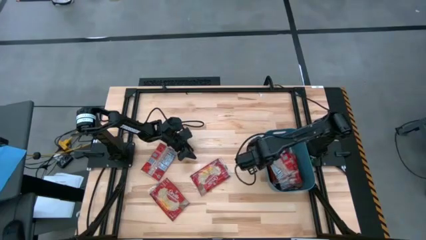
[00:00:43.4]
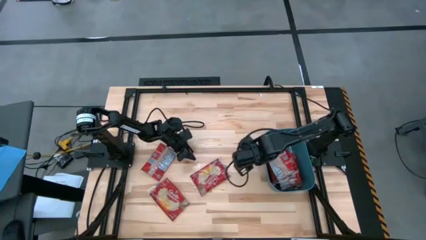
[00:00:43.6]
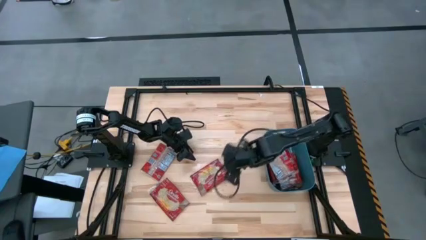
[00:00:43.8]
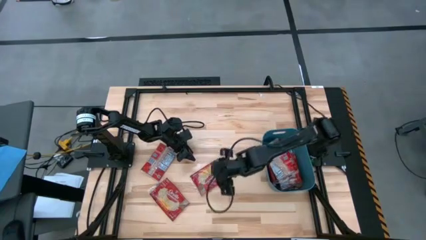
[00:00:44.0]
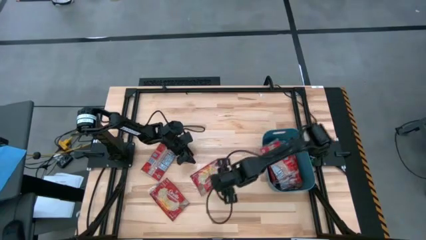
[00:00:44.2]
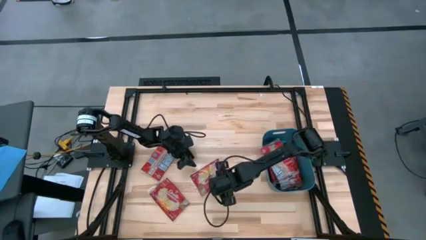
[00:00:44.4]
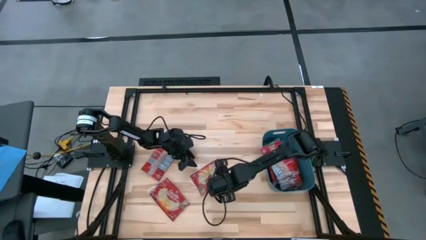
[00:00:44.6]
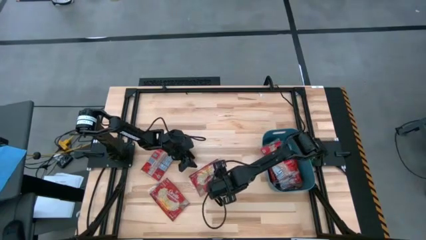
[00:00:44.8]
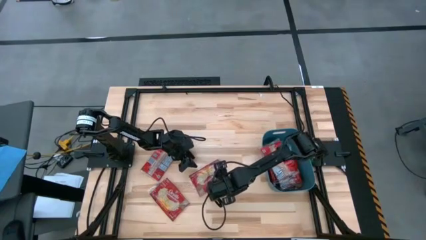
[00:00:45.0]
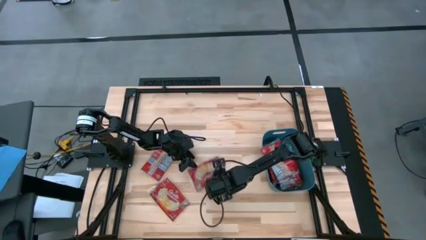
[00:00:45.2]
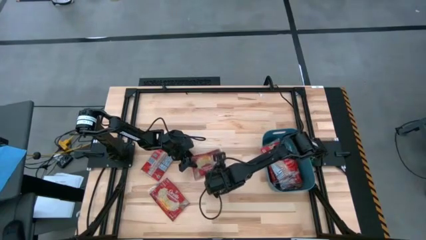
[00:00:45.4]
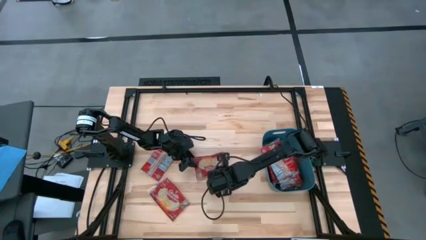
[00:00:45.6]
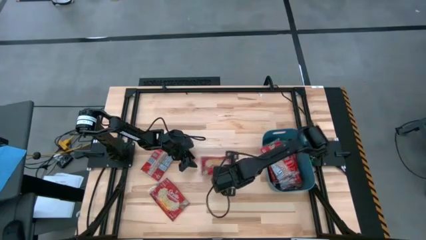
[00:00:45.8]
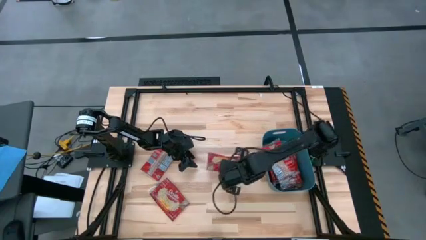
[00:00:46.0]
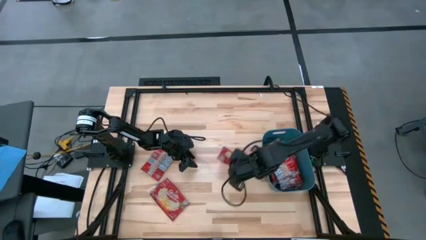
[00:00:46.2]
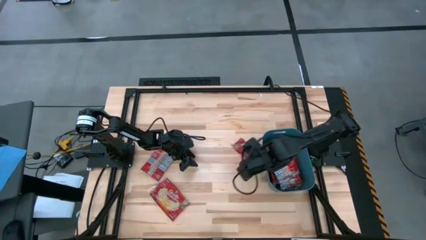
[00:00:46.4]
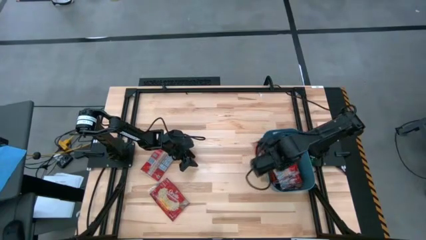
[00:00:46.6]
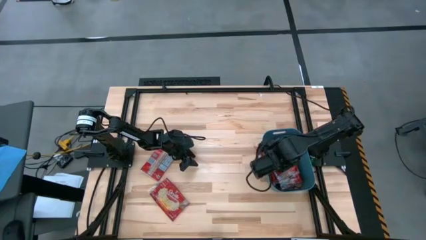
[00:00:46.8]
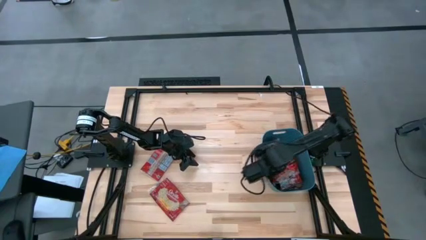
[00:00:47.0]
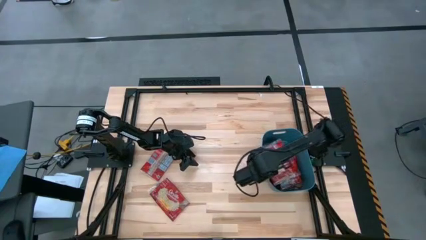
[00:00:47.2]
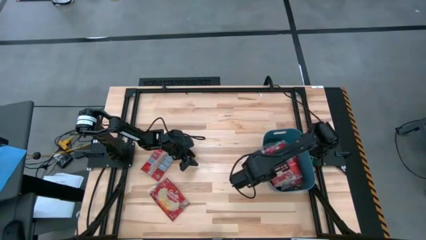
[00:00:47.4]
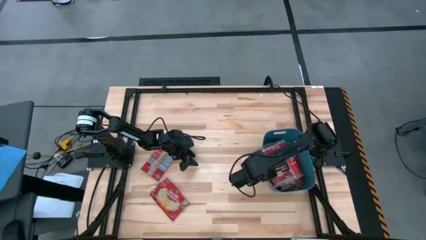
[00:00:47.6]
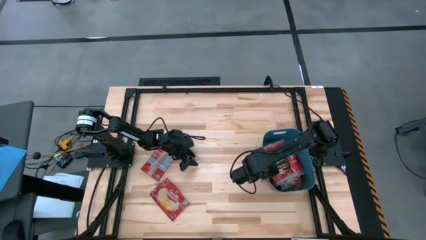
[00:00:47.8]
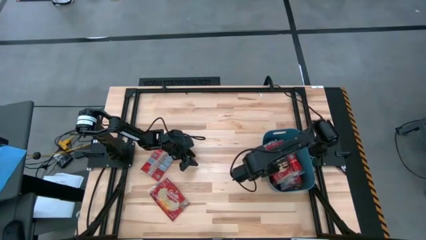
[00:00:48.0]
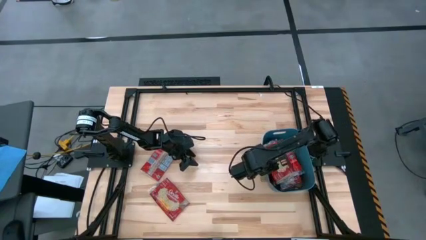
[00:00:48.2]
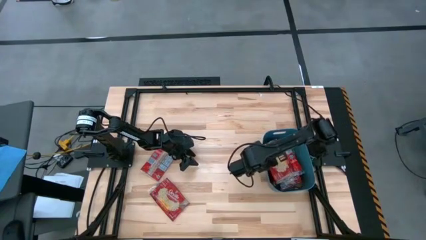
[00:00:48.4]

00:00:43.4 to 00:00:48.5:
Task: Sort popcorn bags into baskets
Stack the popcorn bag into the blue bin

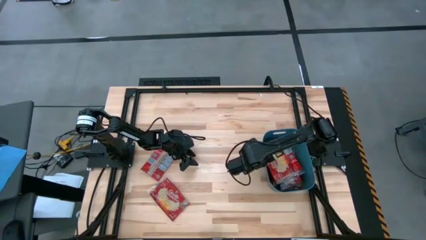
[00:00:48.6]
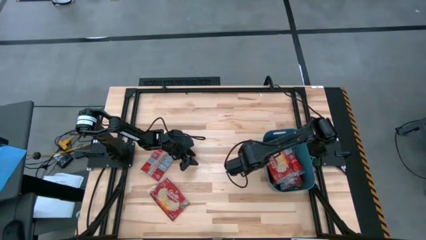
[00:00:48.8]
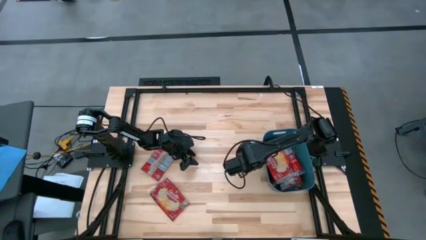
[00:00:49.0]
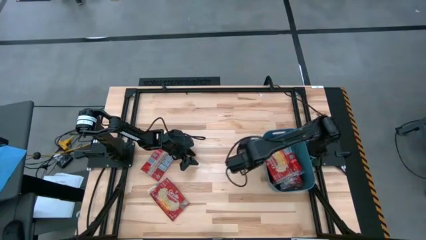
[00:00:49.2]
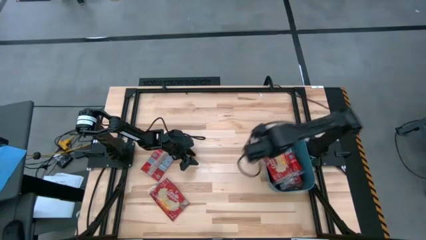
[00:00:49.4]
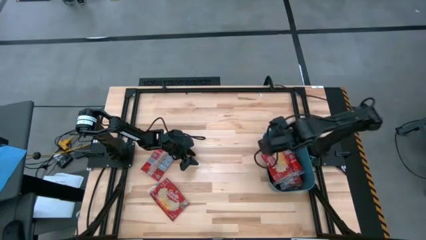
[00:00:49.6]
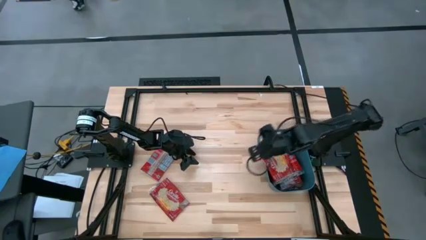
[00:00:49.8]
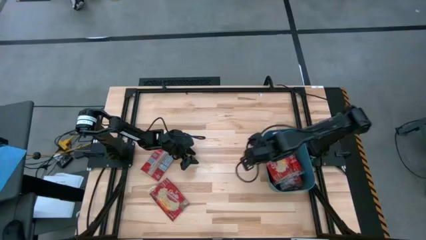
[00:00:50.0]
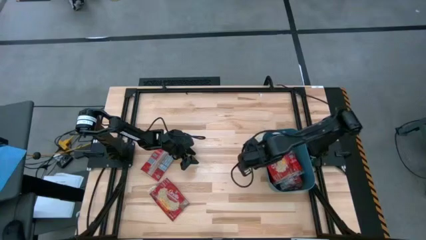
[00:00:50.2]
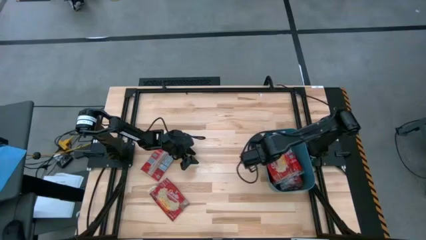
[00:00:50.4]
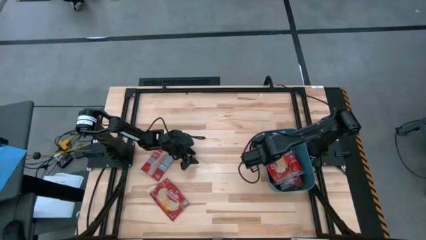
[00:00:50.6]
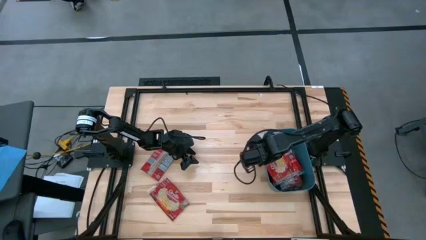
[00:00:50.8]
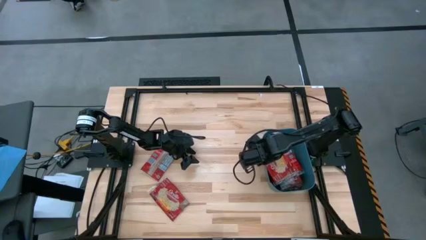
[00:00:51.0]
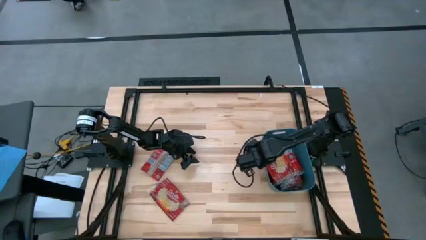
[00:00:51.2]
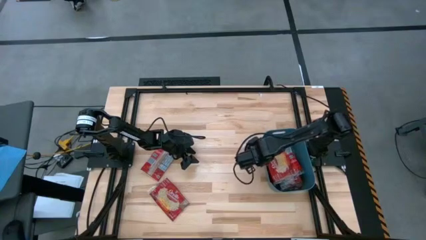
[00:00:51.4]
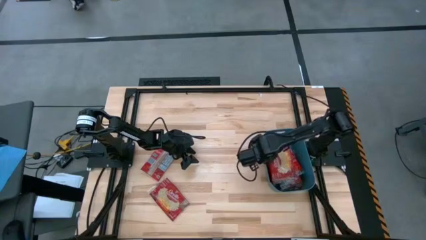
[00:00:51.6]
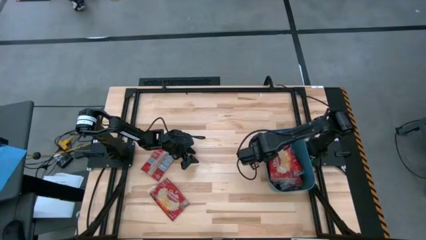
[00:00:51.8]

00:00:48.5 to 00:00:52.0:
Adjust the popcorn bag in the center

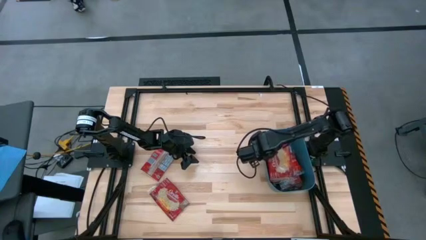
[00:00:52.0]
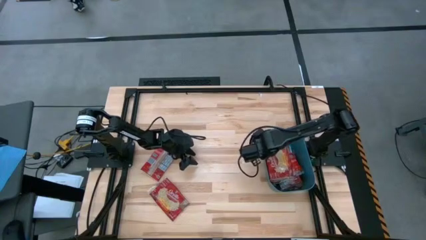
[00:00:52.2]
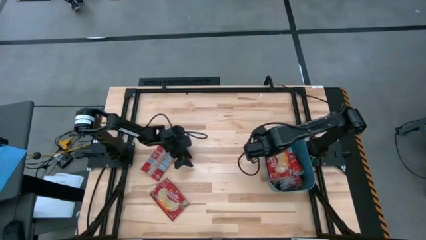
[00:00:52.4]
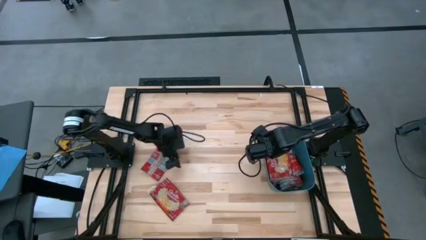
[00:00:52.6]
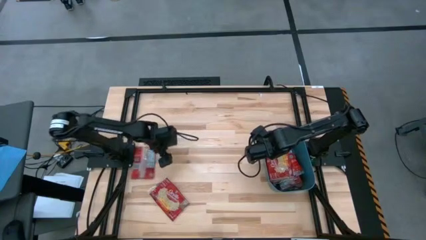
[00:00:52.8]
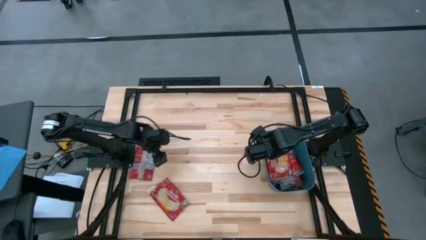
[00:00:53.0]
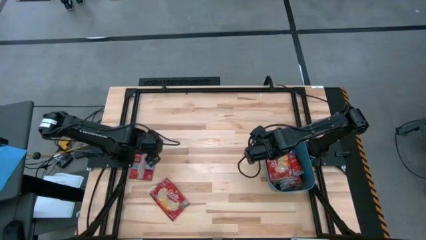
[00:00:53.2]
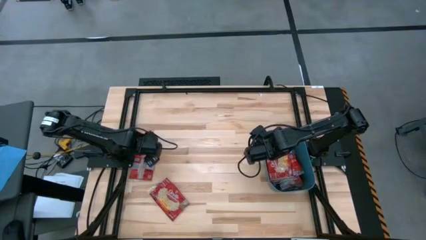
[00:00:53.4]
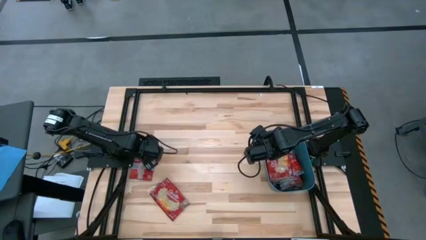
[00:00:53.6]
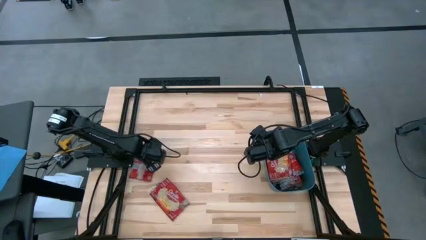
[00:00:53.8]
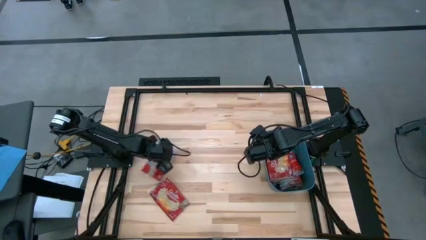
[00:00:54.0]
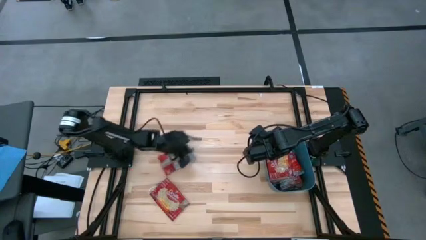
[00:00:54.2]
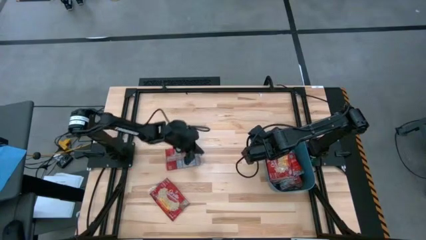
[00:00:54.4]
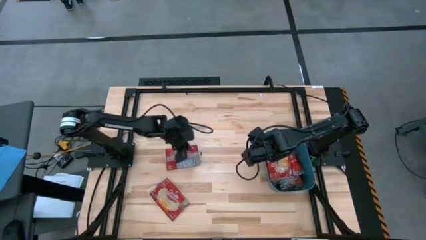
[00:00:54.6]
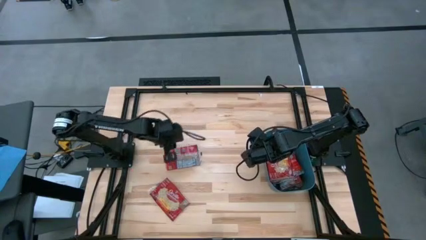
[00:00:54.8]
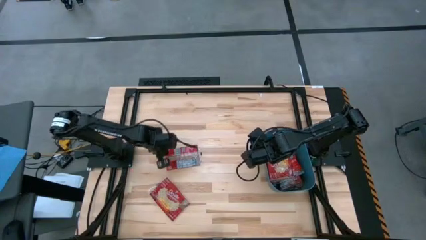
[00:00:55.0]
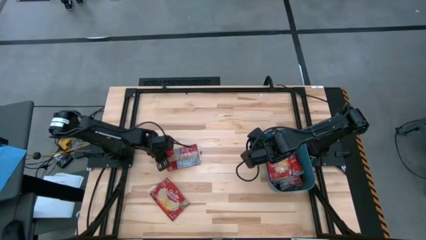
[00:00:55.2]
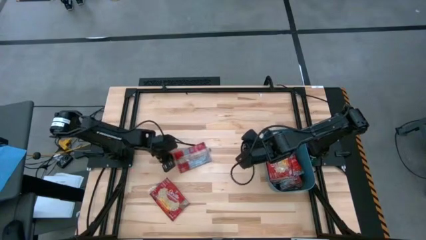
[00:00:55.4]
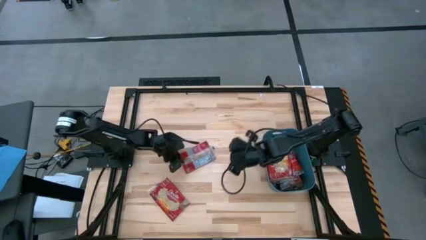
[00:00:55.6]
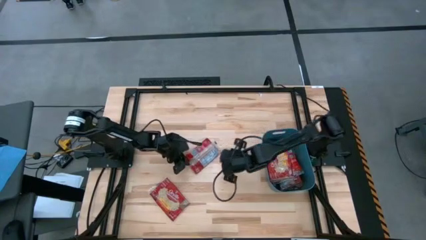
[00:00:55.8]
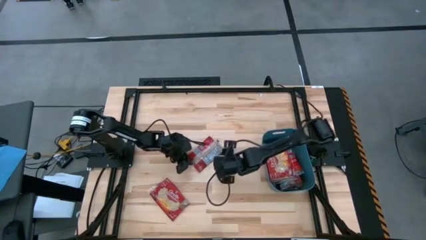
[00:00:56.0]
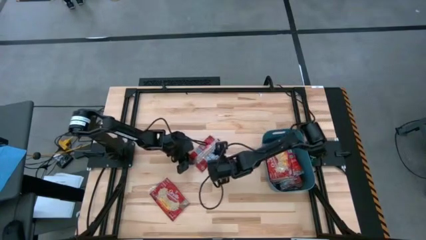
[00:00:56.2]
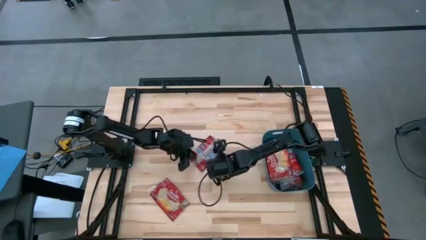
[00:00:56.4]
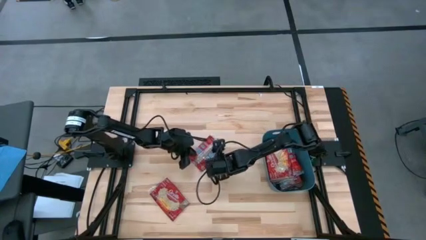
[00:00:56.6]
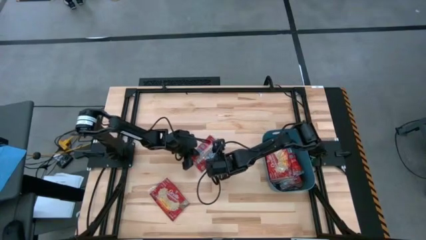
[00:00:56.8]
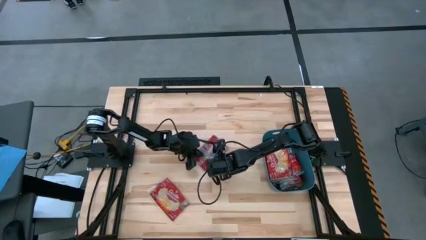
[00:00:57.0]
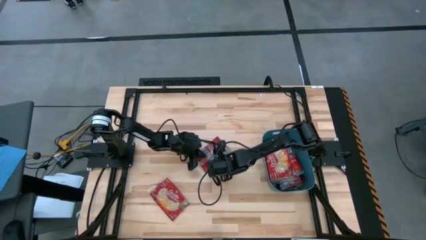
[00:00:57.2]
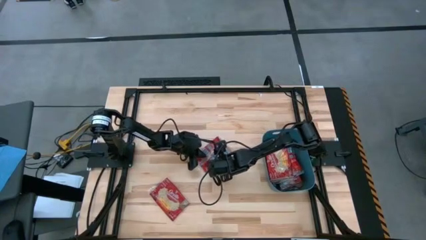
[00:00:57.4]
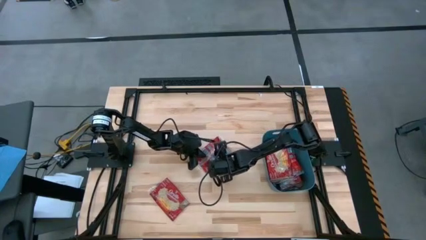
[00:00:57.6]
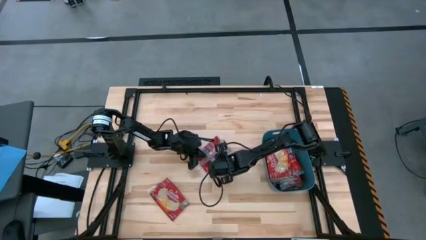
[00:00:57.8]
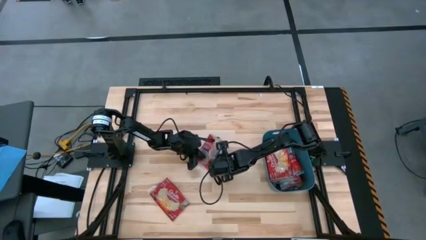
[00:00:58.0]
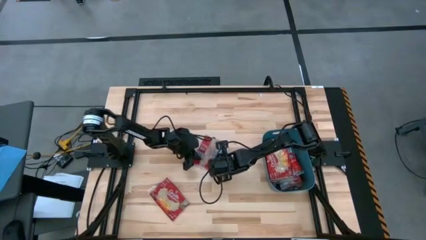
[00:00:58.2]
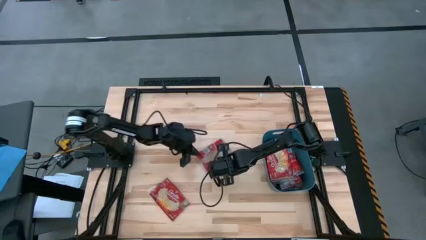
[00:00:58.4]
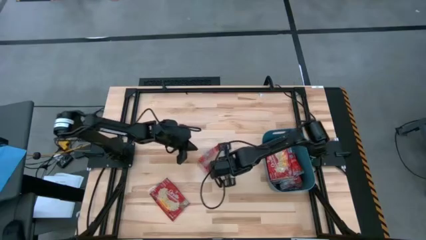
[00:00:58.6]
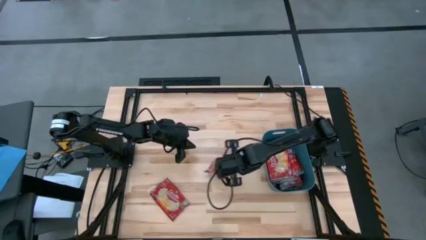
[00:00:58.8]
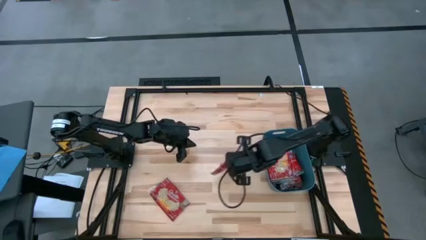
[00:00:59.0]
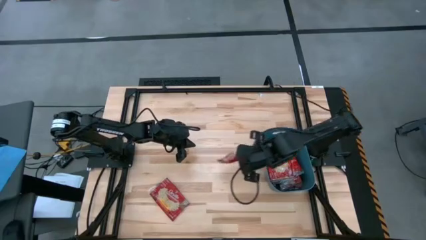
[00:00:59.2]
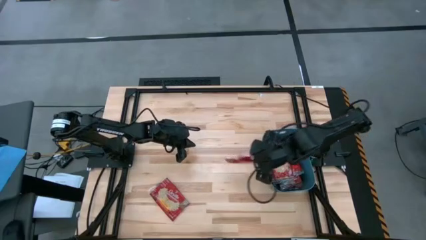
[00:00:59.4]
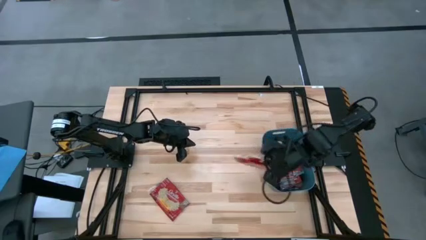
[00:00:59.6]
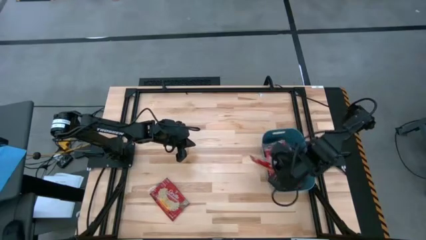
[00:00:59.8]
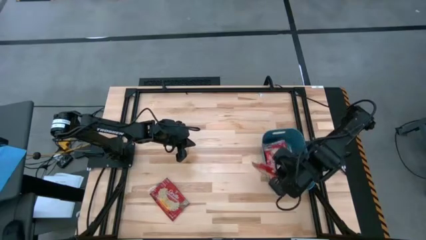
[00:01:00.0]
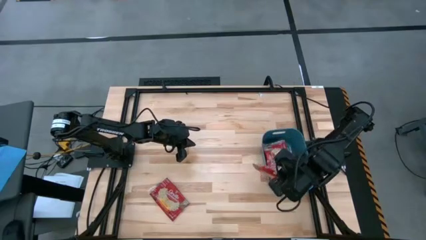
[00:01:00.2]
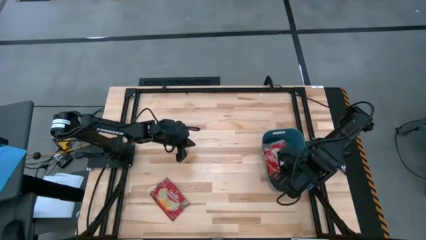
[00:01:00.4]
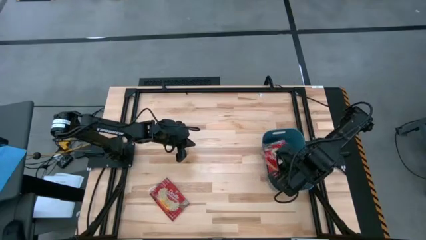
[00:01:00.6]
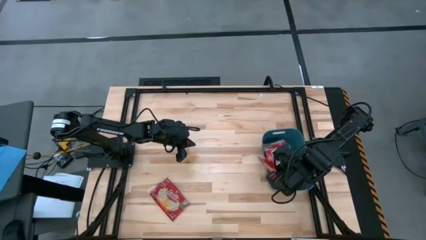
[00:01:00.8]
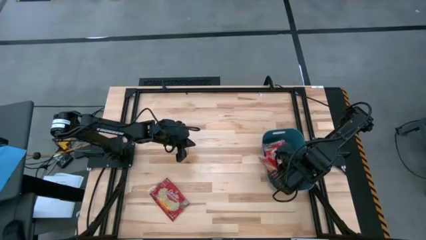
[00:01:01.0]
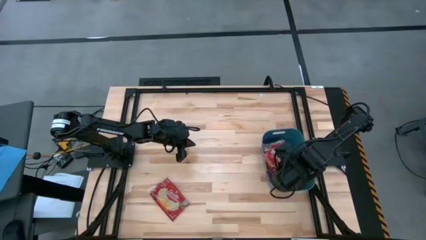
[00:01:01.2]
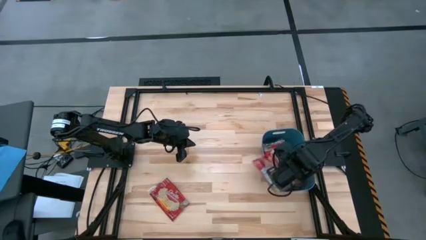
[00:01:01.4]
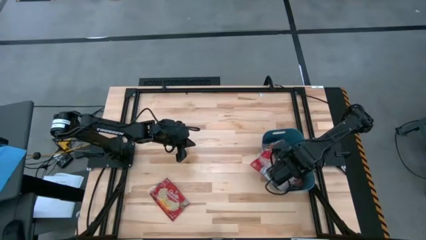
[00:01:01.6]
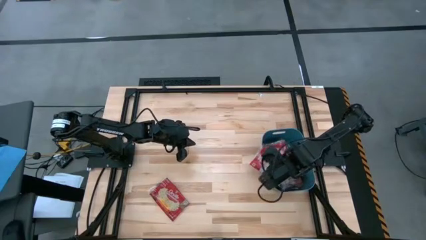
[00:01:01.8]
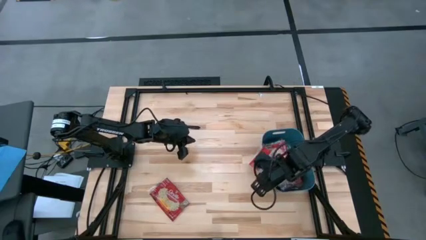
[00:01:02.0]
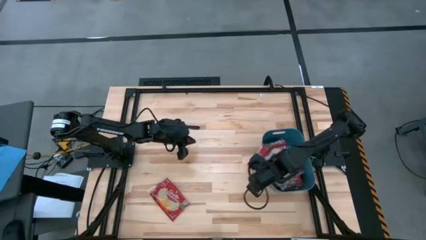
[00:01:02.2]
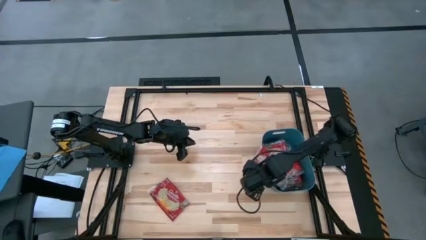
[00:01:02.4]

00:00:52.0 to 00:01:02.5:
Stack the popcorn bag into the blue bin
